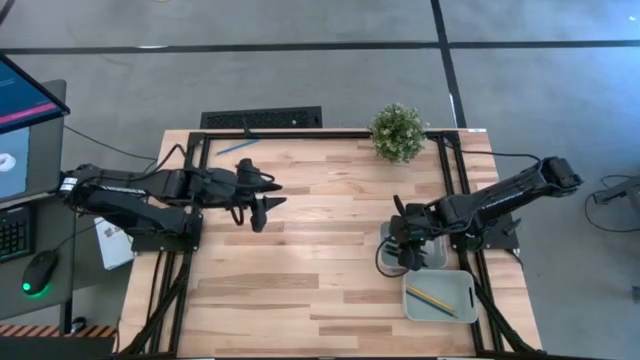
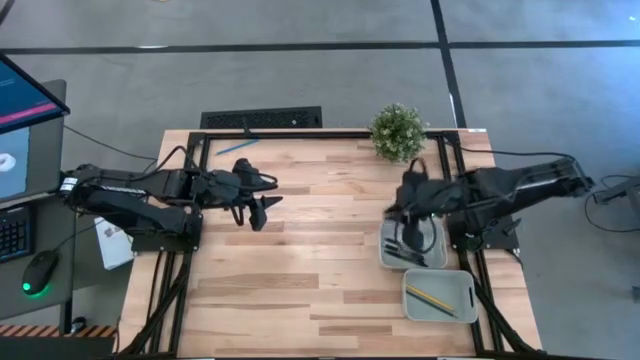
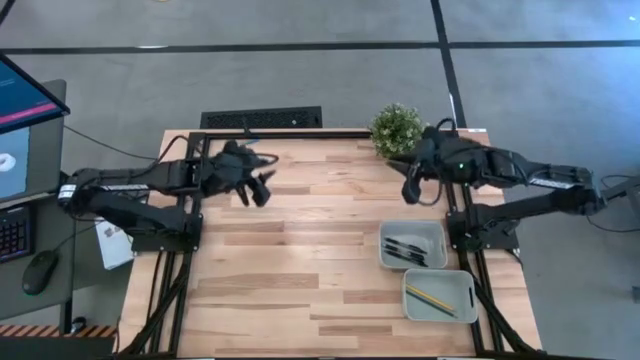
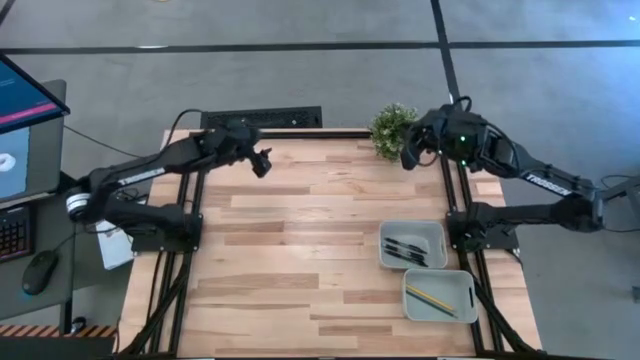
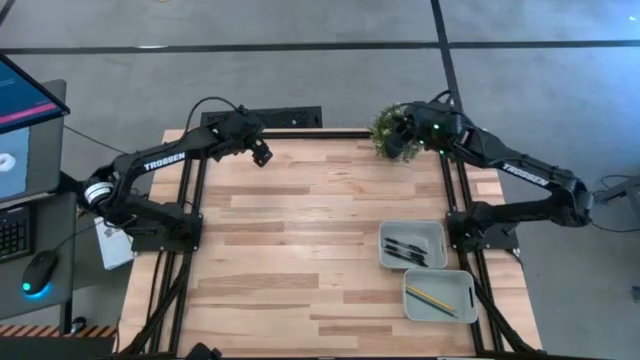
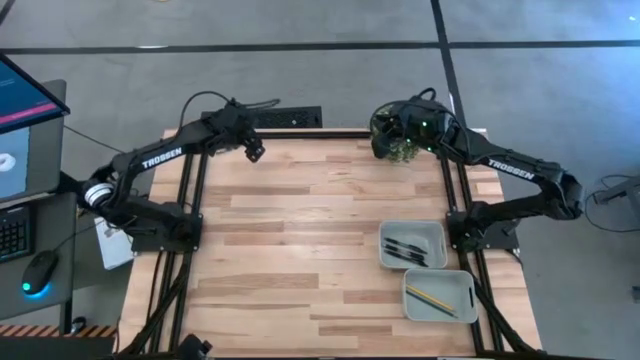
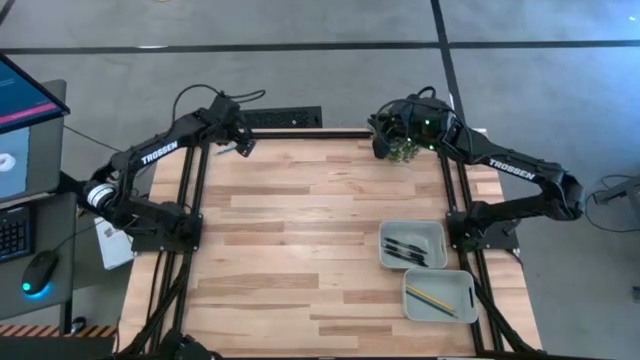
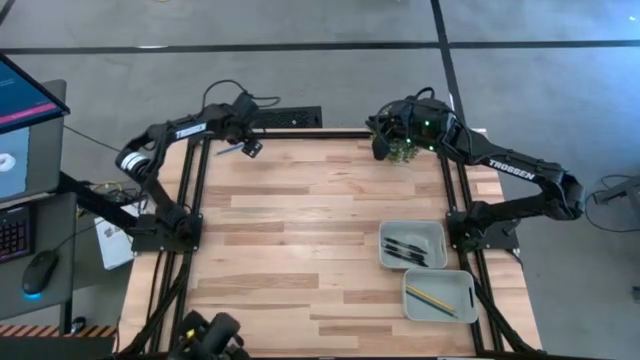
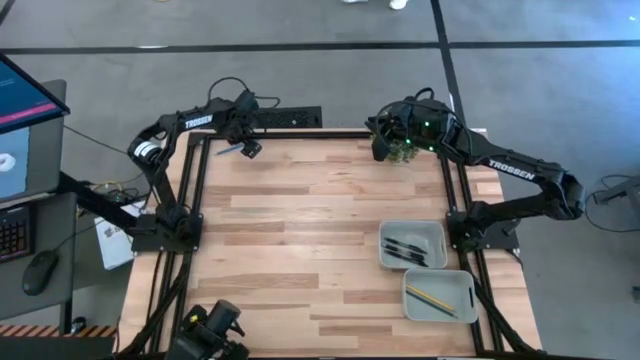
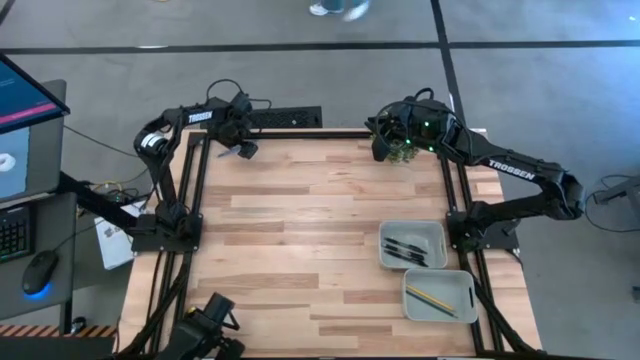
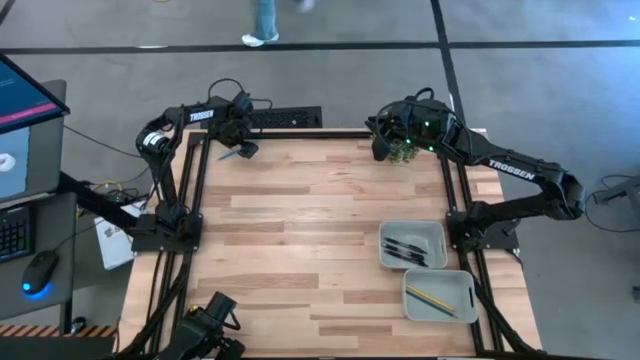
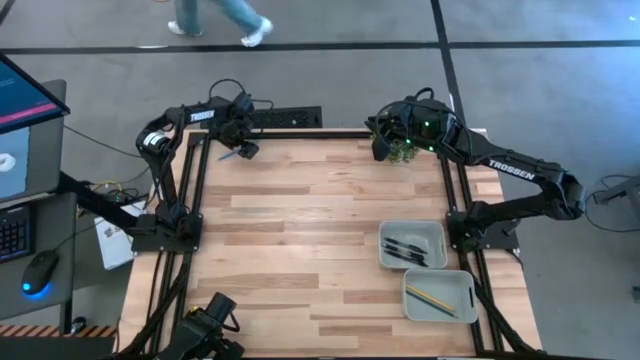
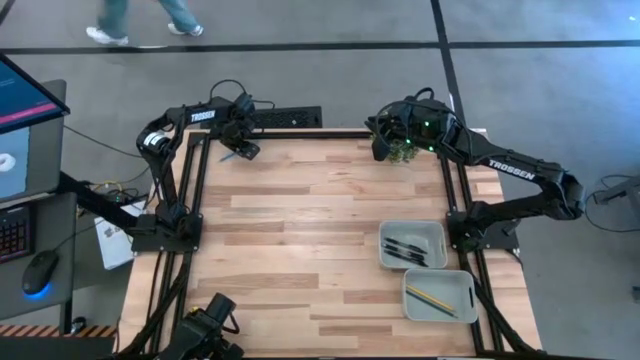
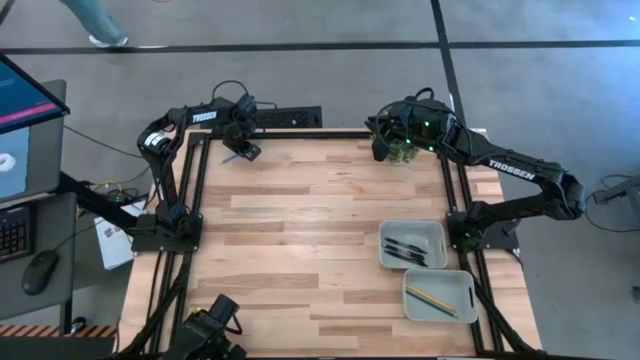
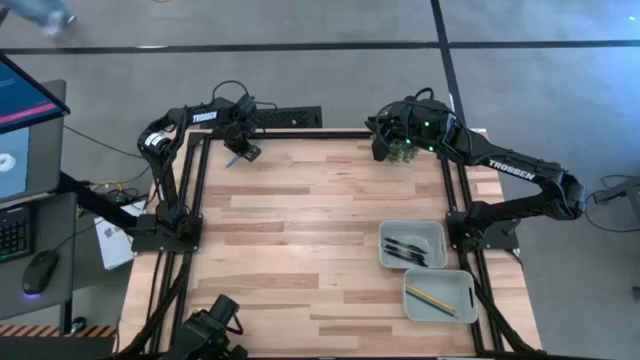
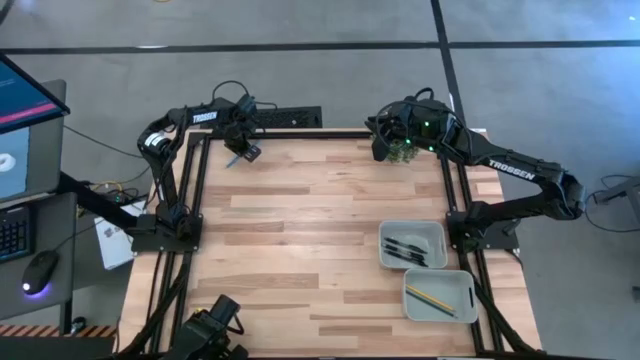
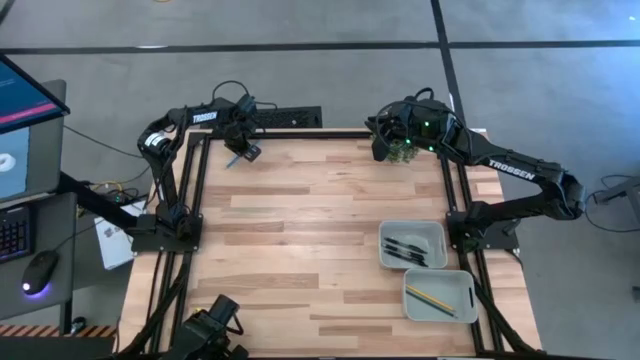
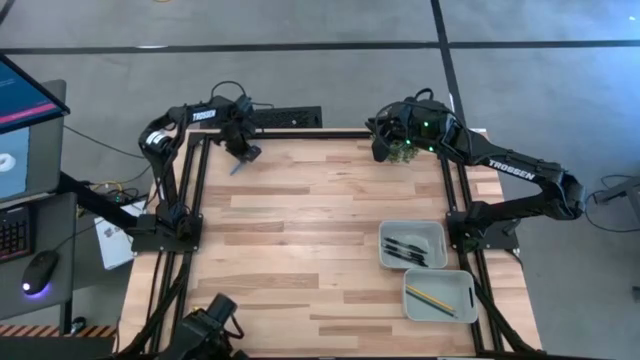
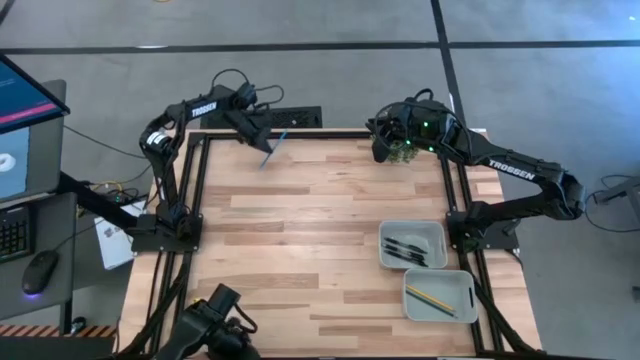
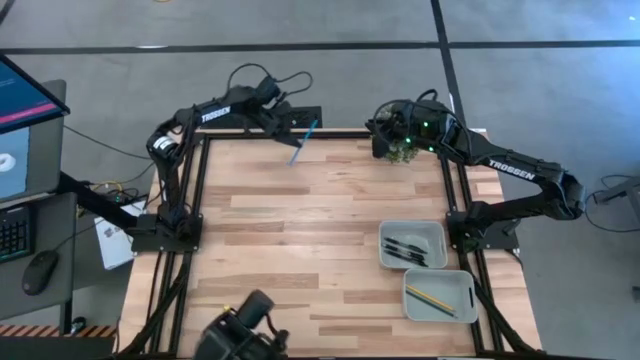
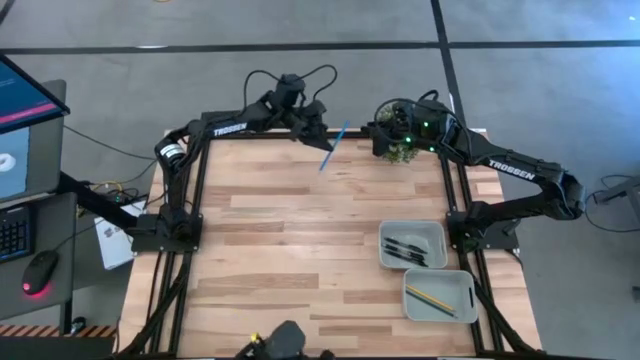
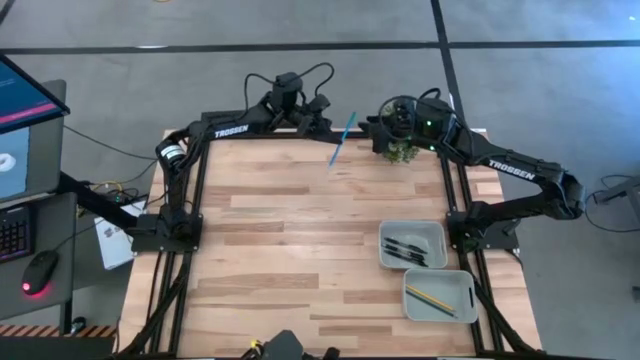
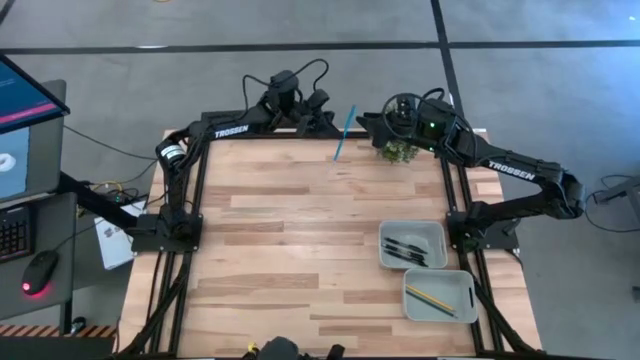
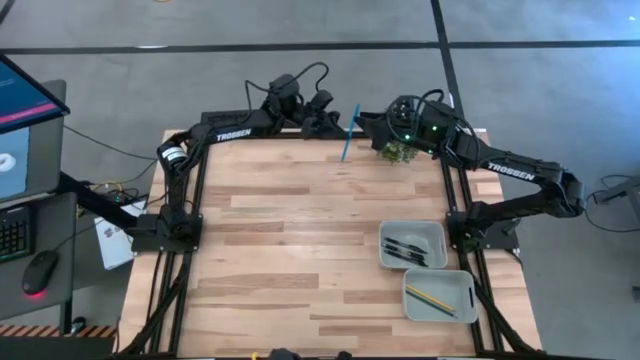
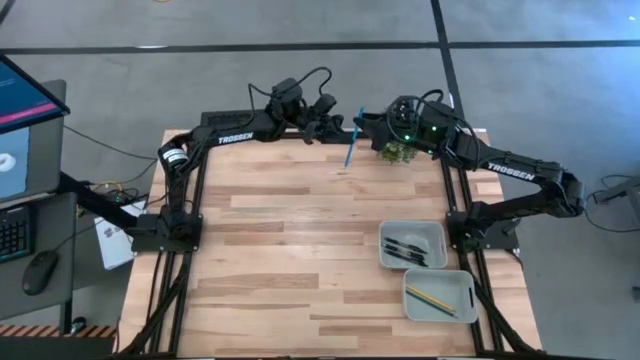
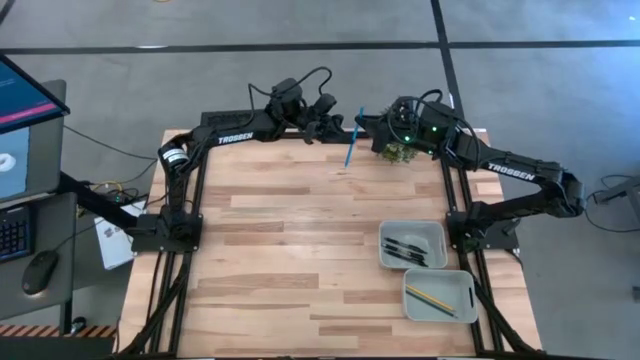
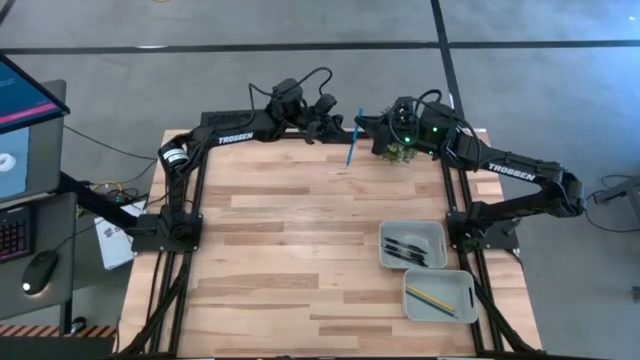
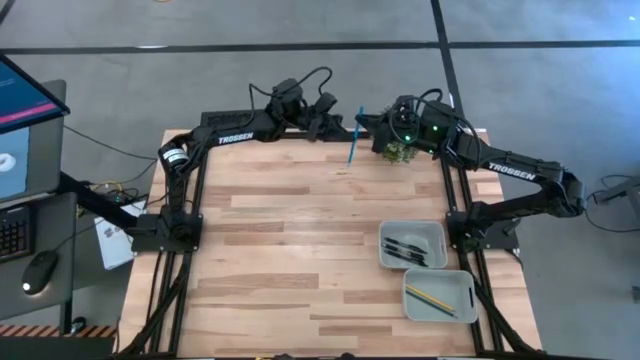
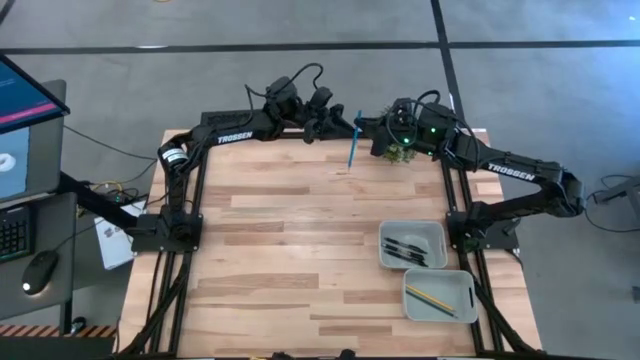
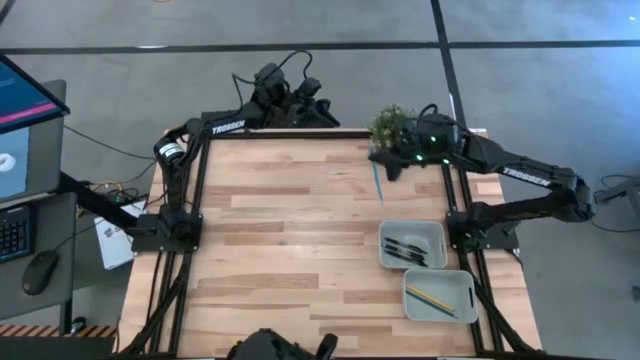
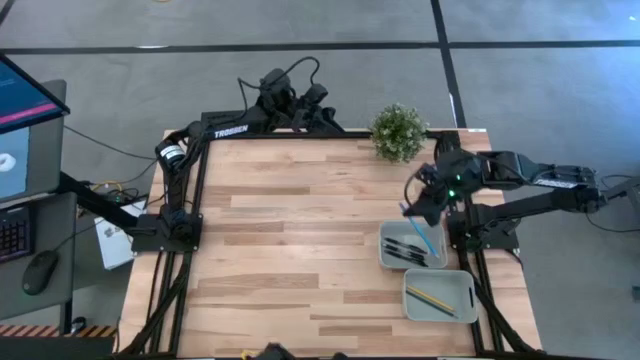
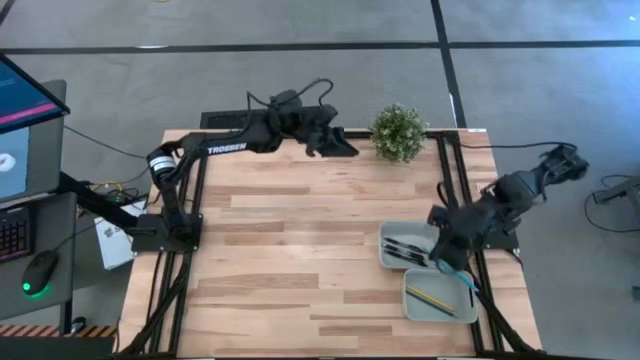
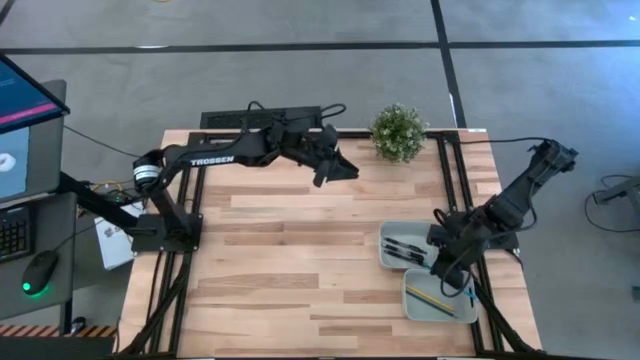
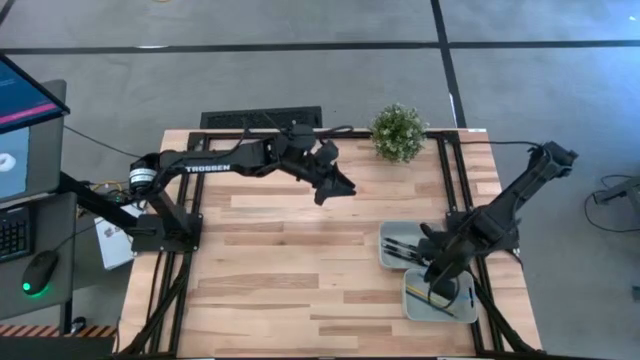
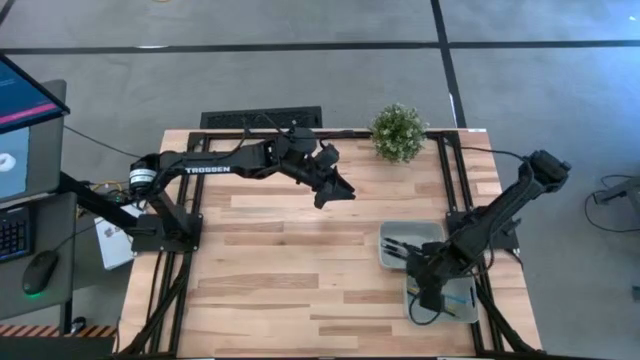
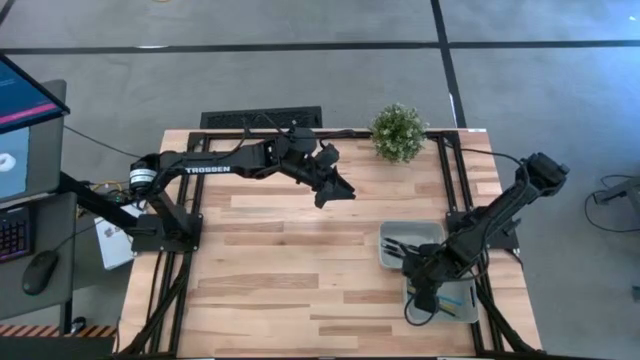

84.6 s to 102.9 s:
Task: Sort pens & pencils
Put the blue pencil into the bottom gray bin

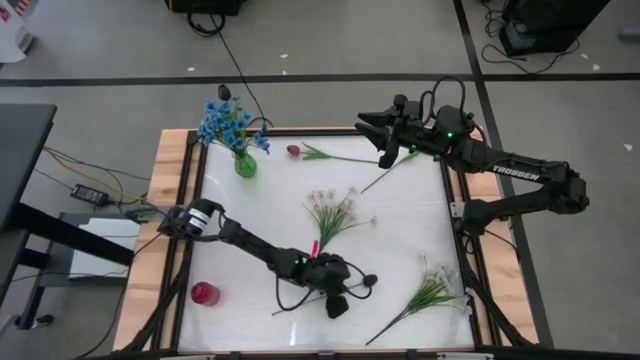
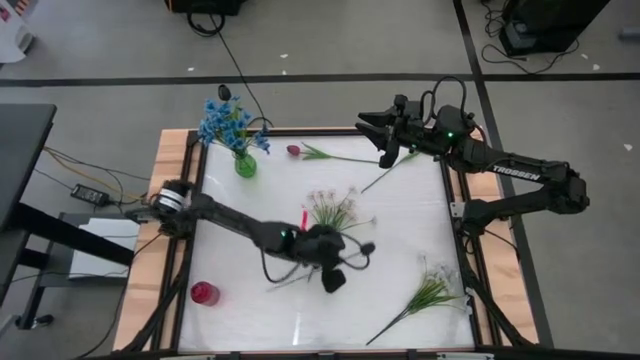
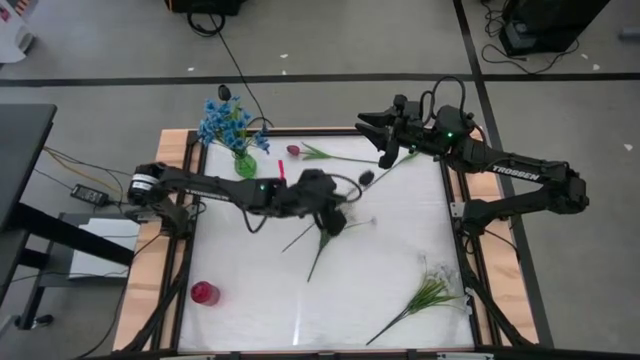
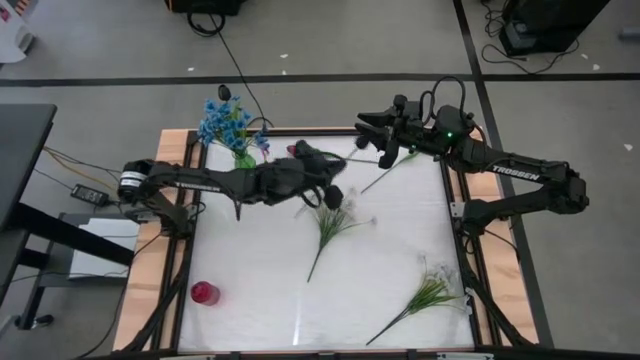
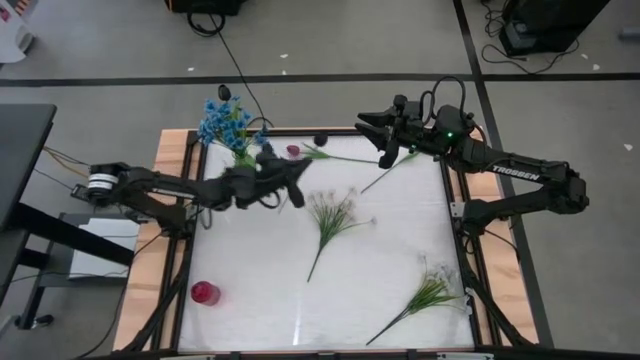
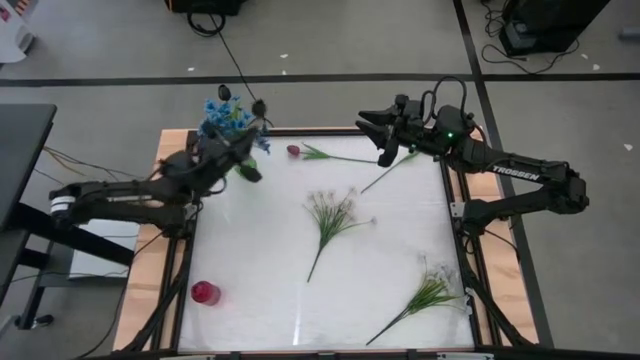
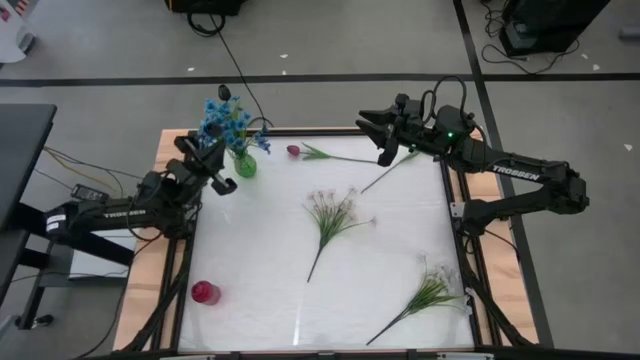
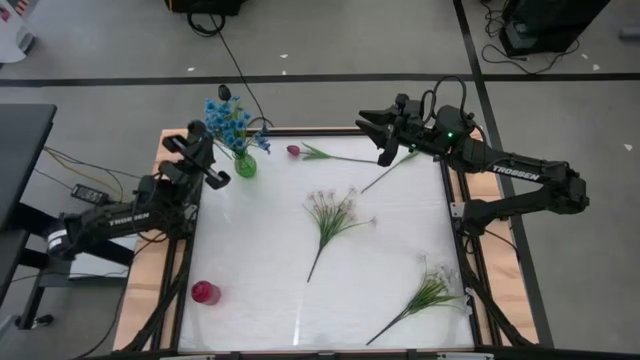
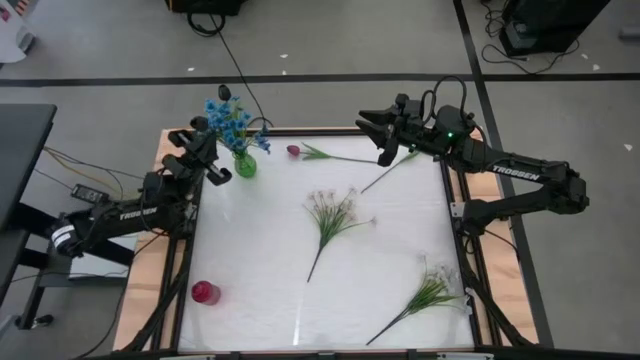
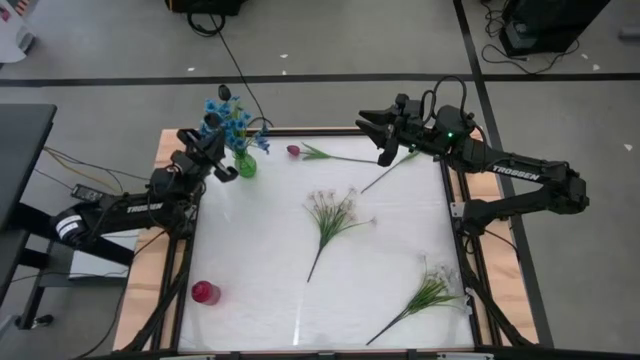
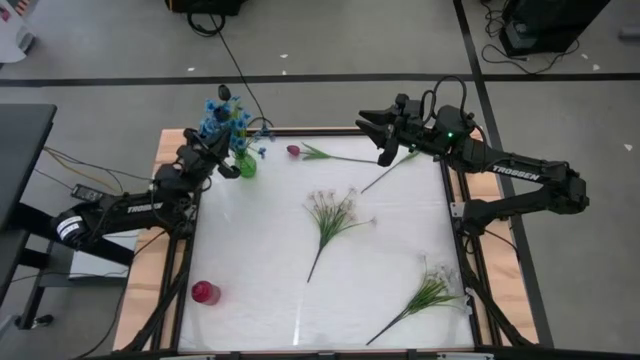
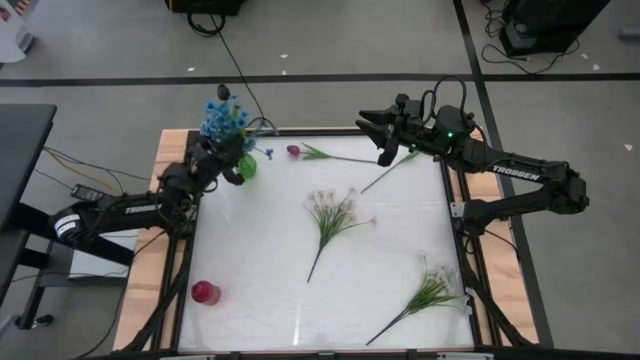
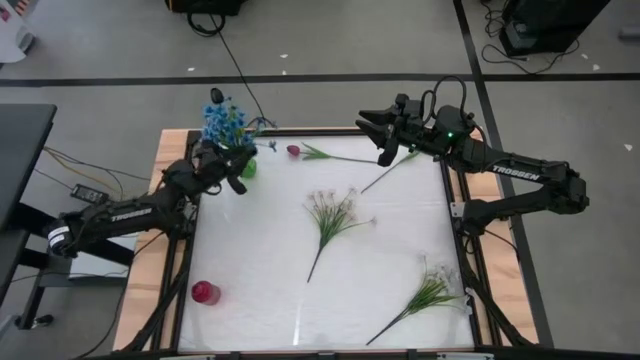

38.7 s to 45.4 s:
Task: Sort flowers into vase by color
Put the black tulip into the green vase
